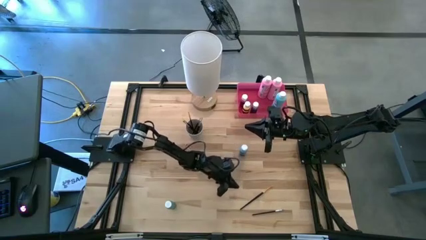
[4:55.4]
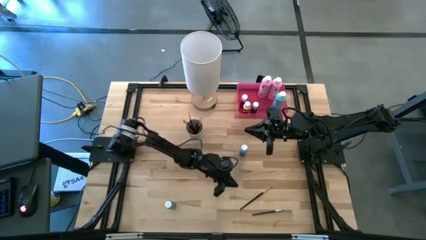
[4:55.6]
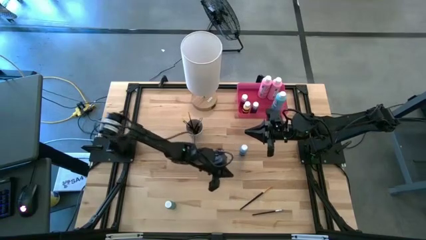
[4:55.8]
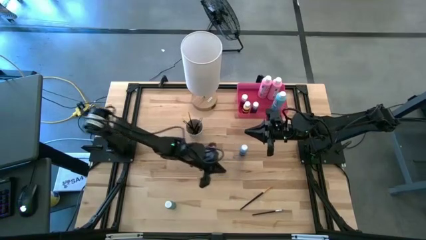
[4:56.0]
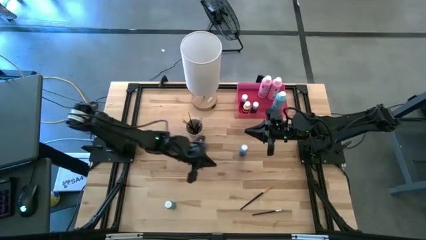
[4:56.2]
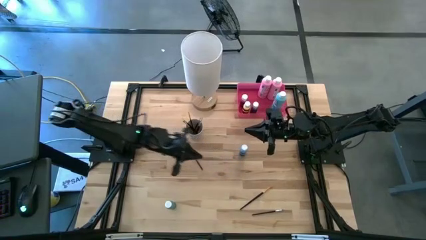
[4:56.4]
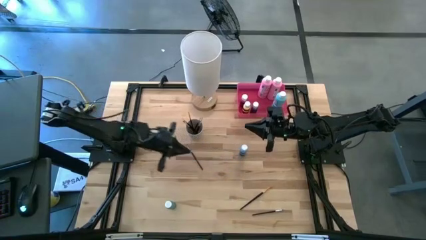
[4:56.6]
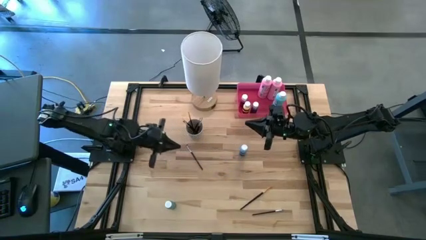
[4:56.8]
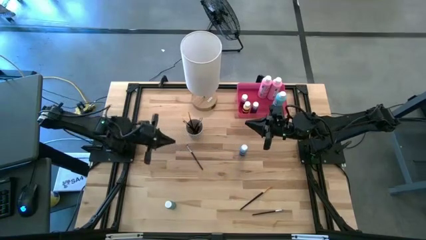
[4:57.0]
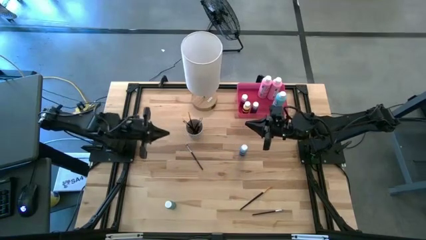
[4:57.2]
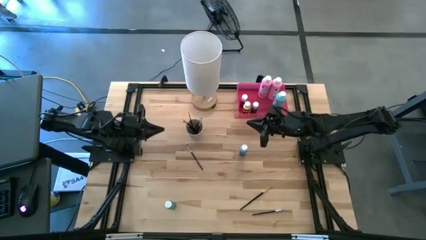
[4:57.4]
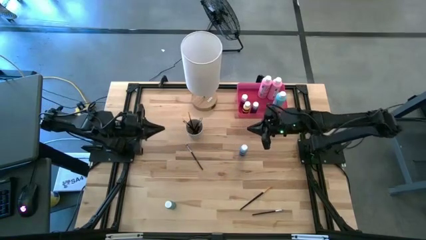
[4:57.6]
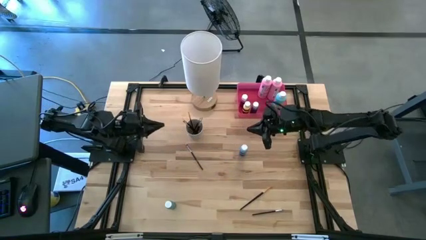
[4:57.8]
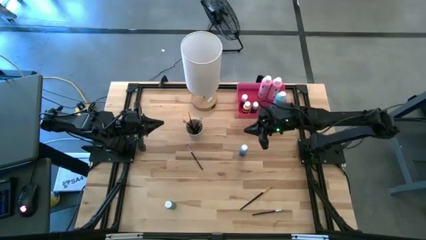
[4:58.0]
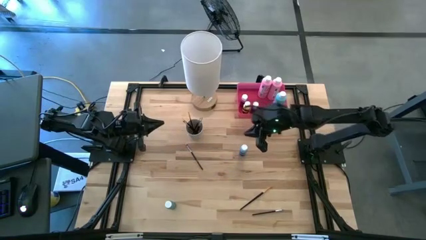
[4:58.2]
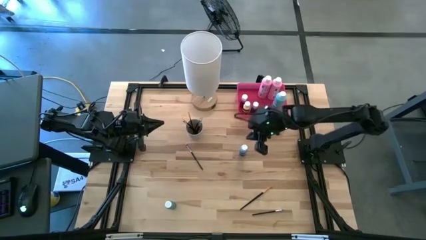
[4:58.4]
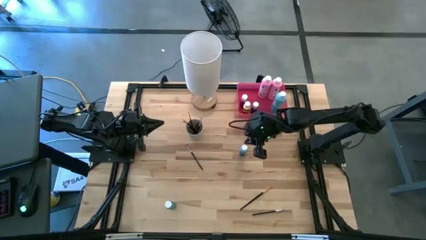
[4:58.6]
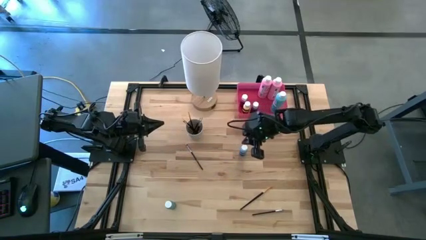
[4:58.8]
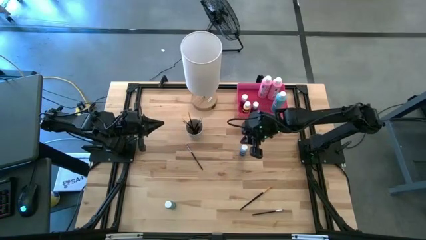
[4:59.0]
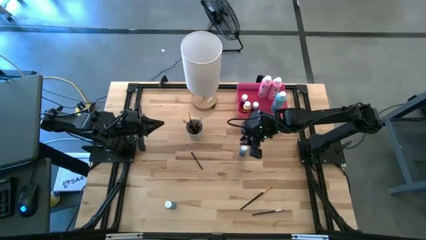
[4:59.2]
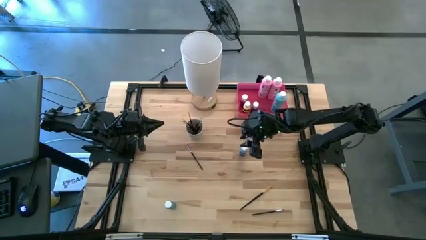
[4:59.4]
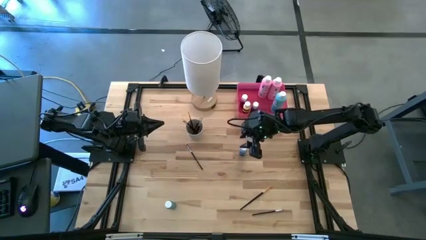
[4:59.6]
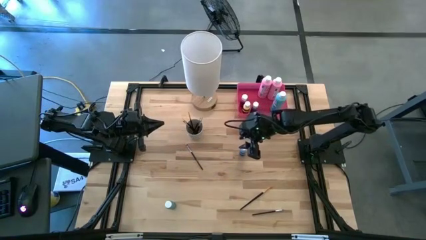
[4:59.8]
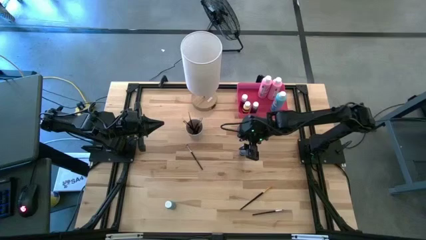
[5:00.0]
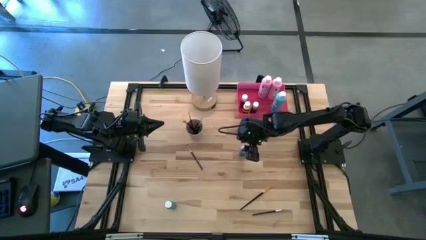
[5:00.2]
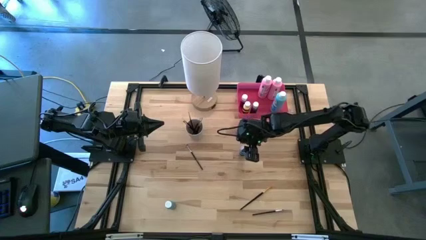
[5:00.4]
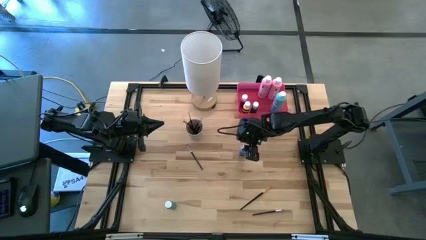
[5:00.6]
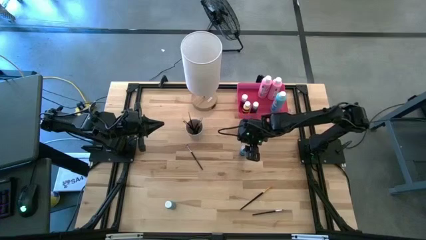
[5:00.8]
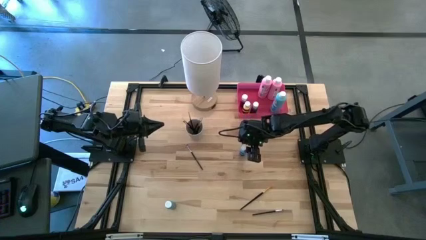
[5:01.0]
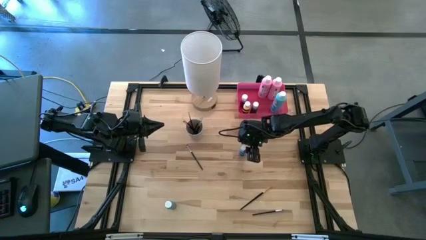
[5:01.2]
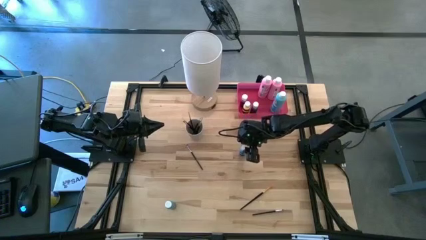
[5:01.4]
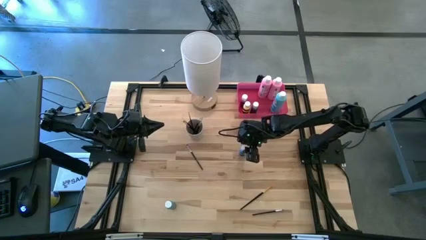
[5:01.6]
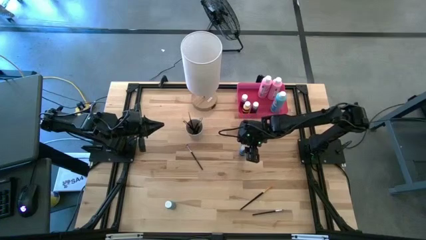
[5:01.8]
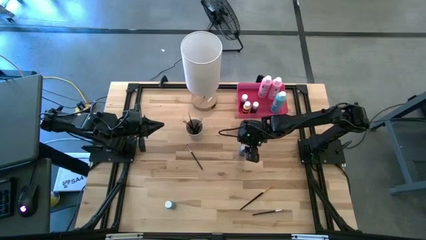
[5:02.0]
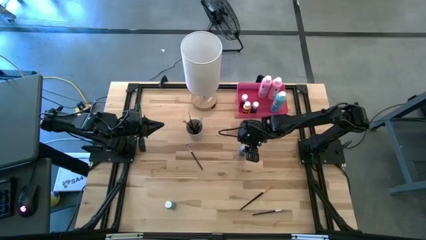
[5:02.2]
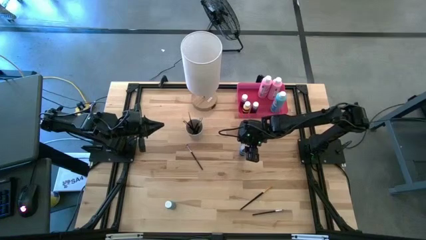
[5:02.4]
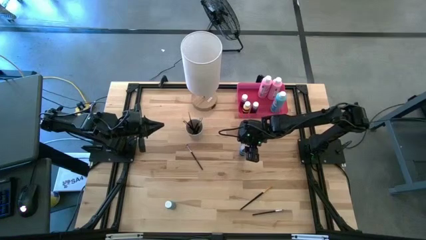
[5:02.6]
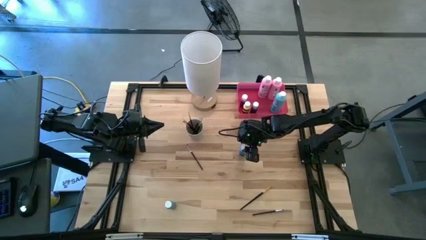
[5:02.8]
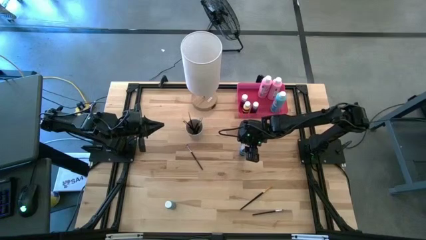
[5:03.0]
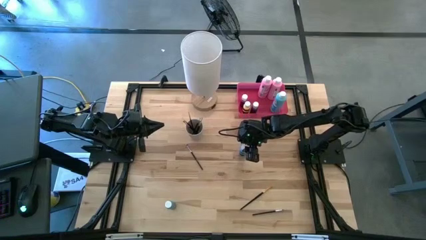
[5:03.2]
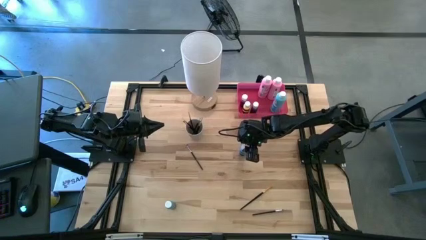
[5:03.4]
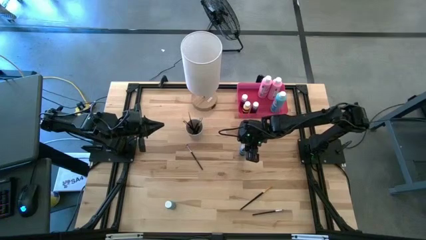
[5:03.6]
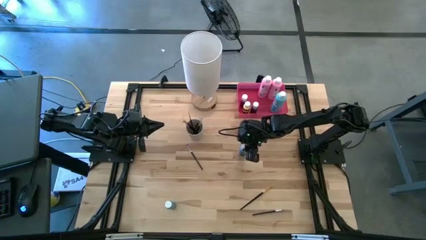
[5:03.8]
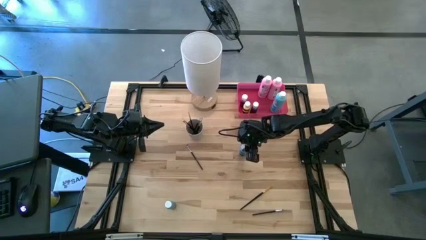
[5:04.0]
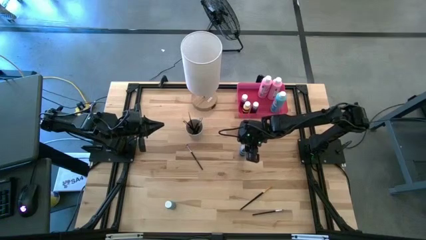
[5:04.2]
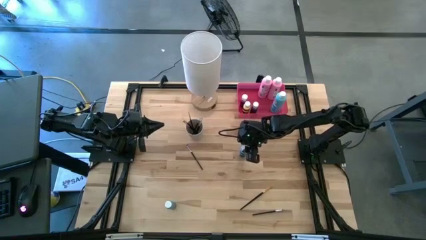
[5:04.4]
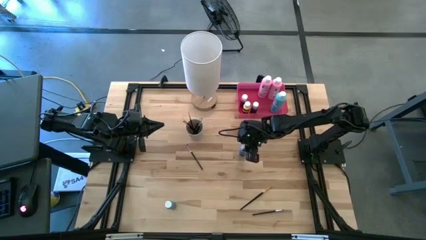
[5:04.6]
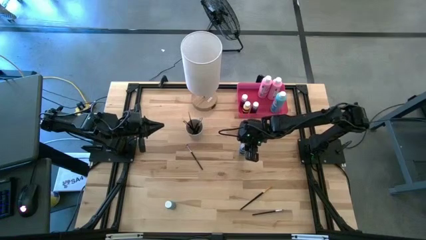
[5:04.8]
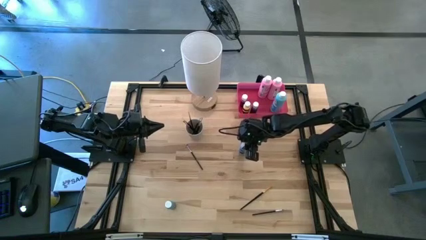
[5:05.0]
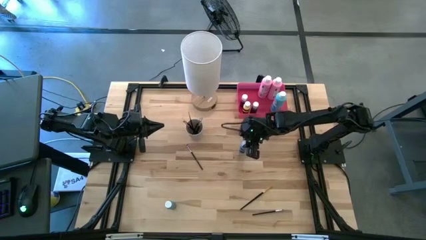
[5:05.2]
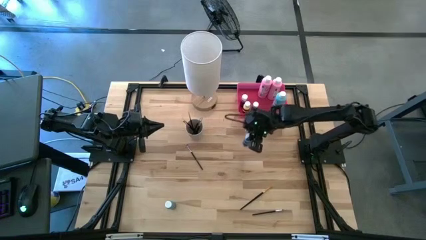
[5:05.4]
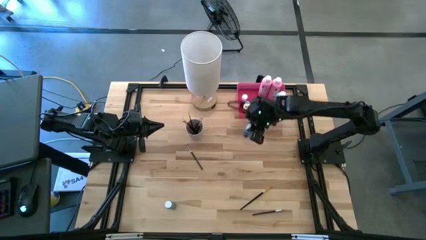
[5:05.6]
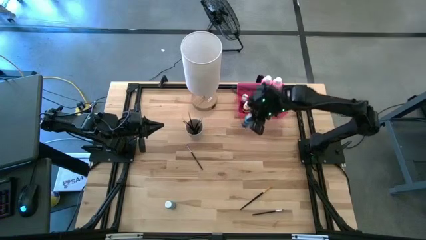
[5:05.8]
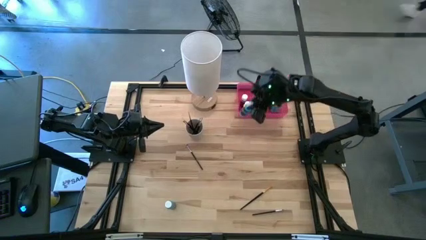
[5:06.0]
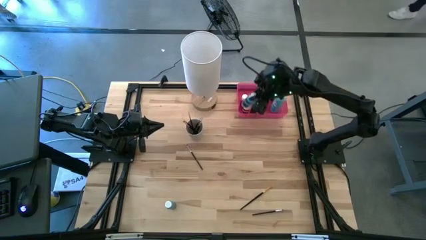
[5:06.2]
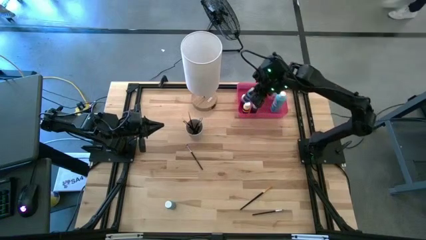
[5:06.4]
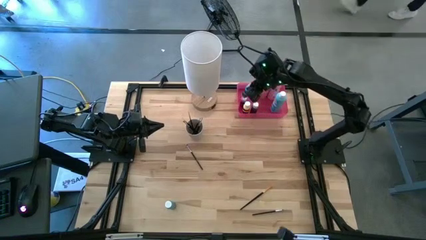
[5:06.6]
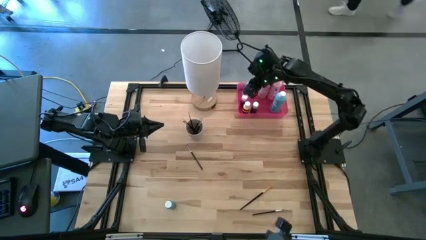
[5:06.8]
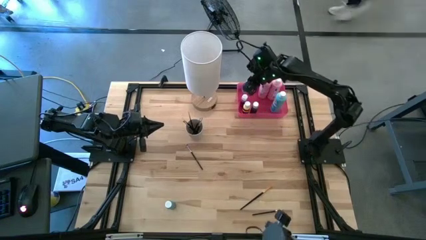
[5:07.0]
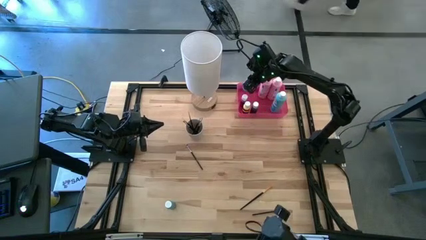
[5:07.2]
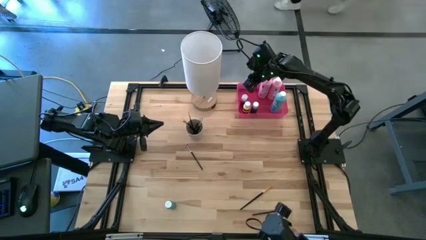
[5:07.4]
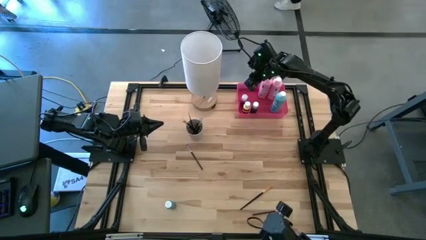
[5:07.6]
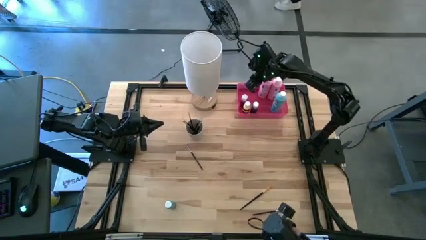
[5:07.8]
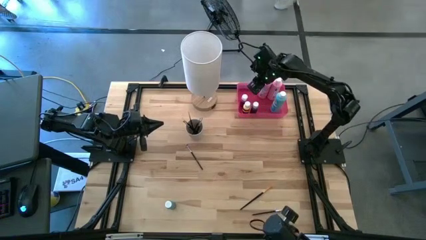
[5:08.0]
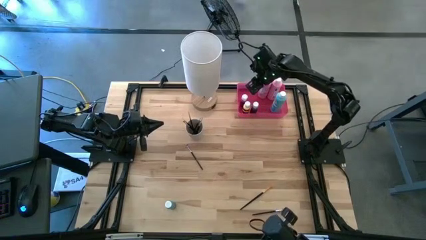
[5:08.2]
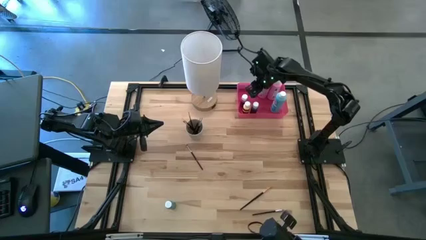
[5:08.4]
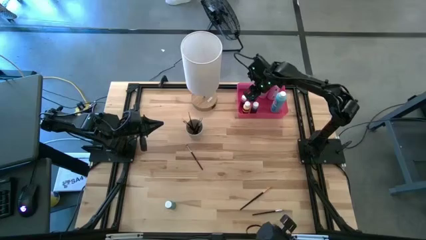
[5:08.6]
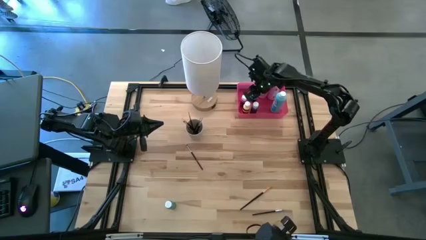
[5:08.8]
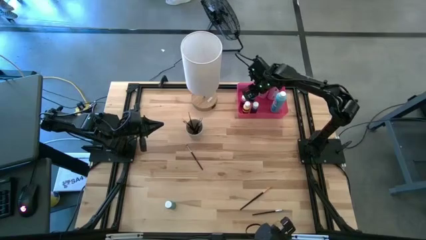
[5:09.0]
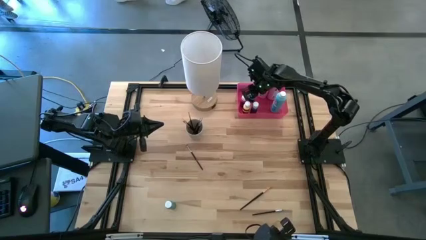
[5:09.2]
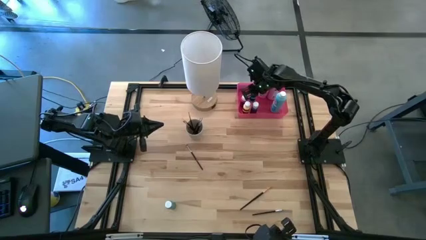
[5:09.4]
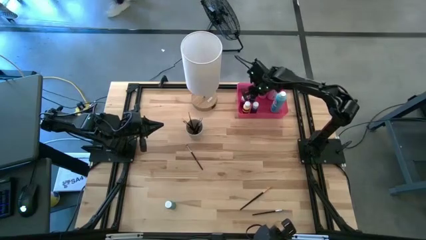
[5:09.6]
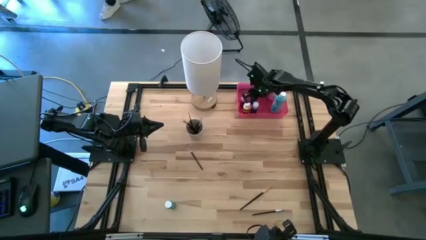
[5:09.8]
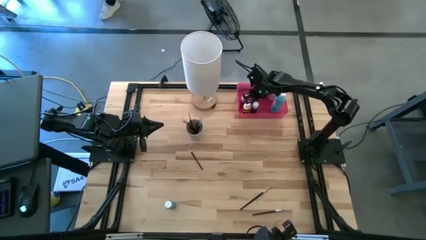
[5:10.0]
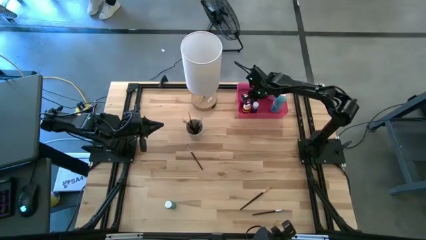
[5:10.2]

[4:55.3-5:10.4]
Task: Pick & Place Paint Supplies
Put the small blue paint bottle into the pink bin
